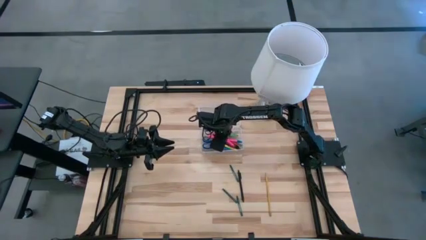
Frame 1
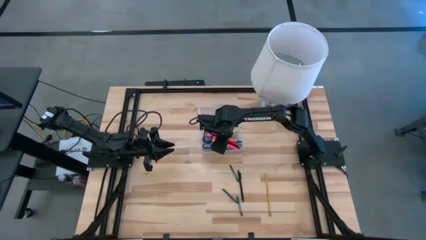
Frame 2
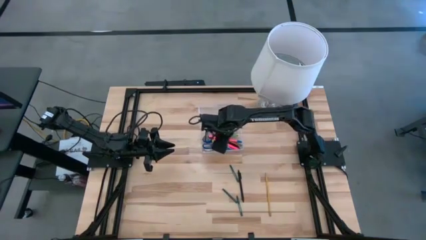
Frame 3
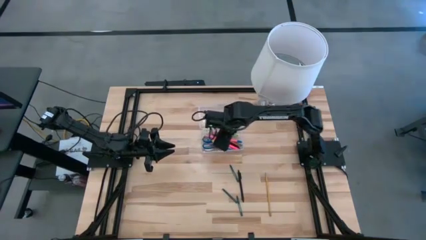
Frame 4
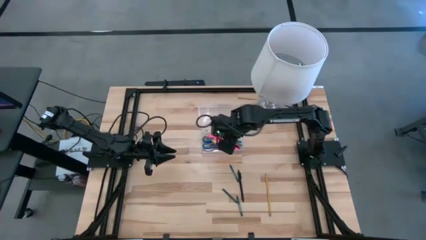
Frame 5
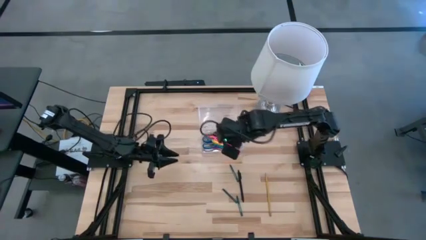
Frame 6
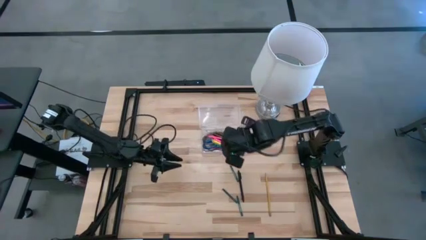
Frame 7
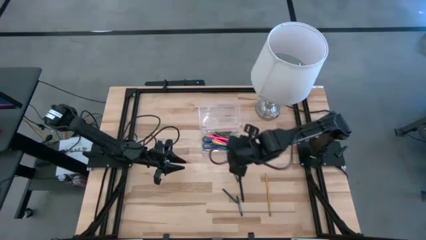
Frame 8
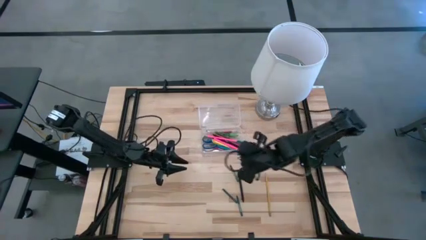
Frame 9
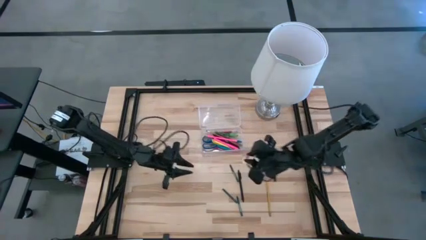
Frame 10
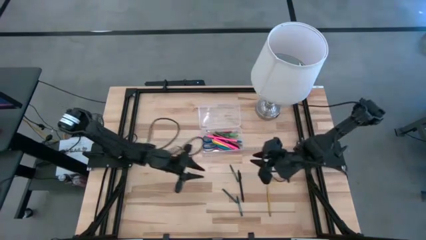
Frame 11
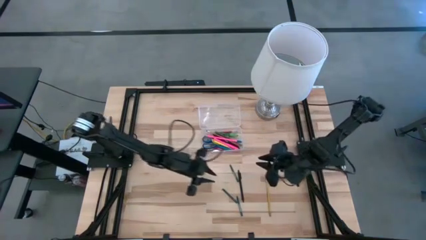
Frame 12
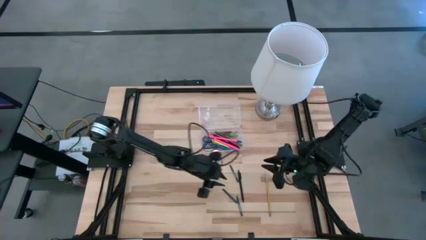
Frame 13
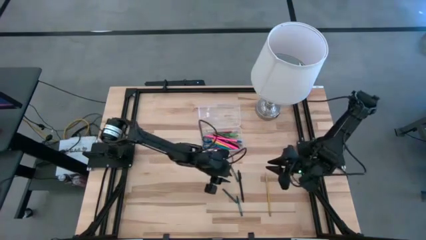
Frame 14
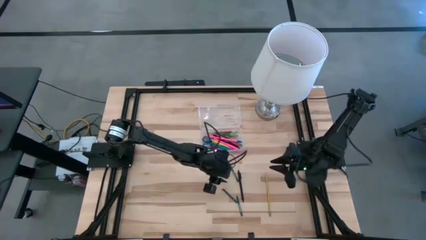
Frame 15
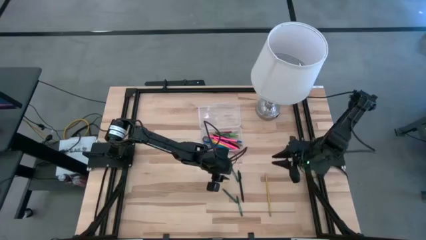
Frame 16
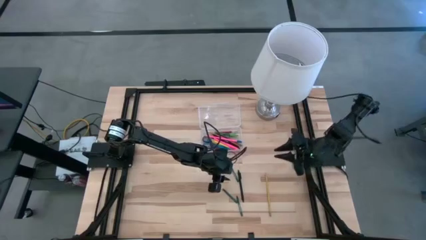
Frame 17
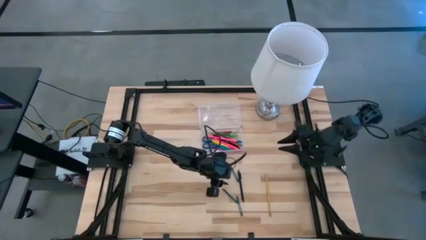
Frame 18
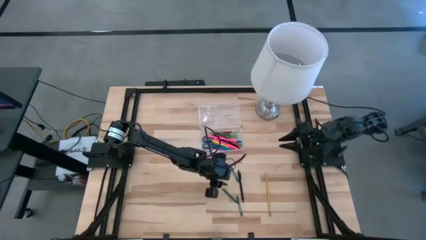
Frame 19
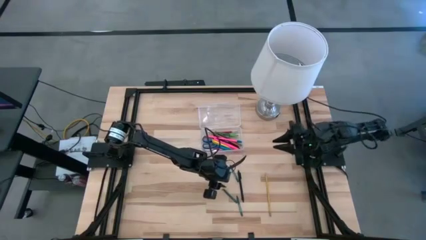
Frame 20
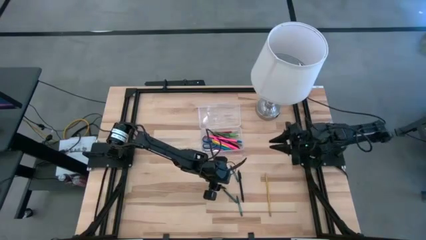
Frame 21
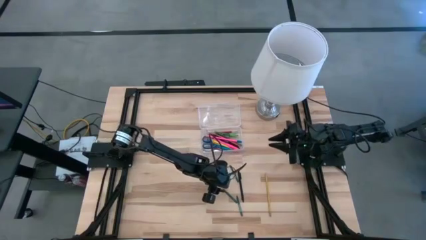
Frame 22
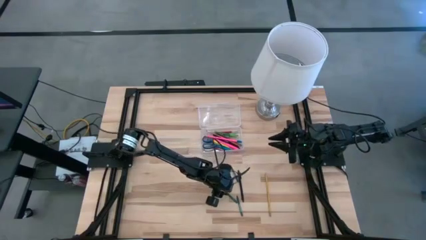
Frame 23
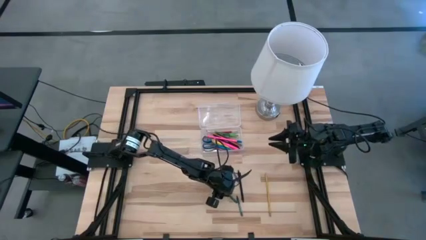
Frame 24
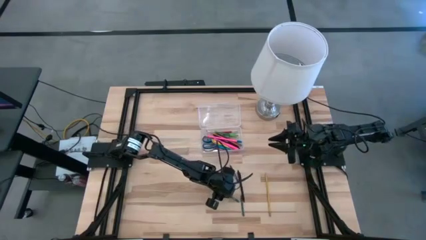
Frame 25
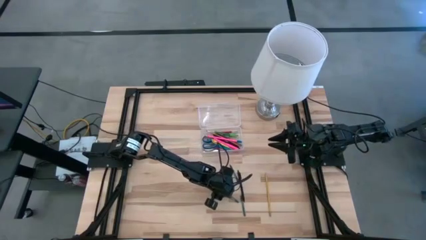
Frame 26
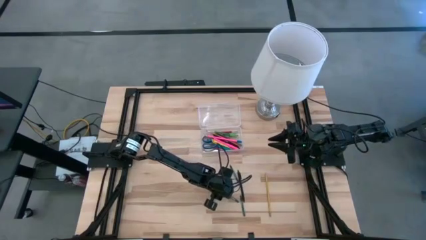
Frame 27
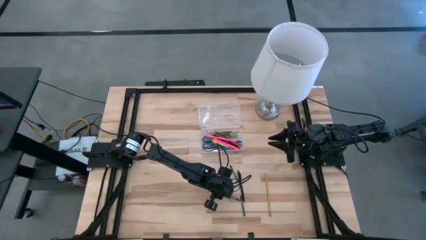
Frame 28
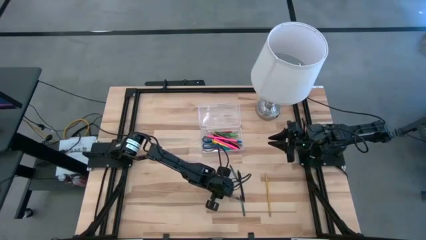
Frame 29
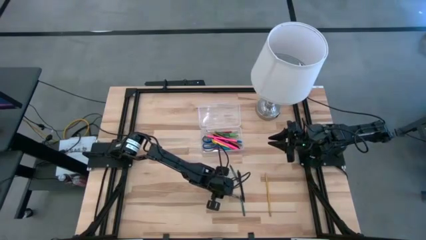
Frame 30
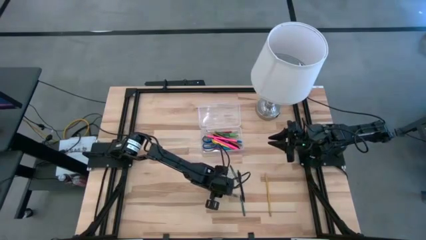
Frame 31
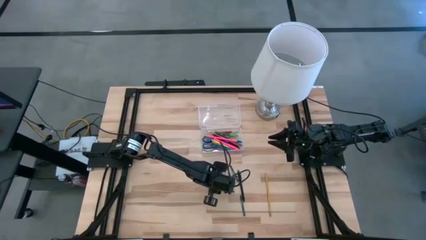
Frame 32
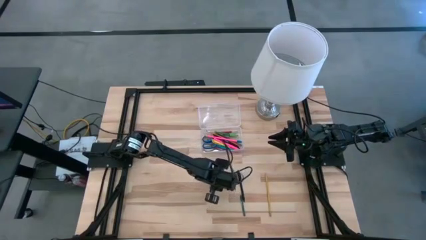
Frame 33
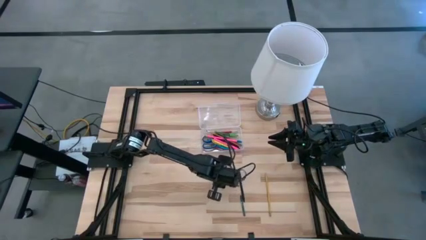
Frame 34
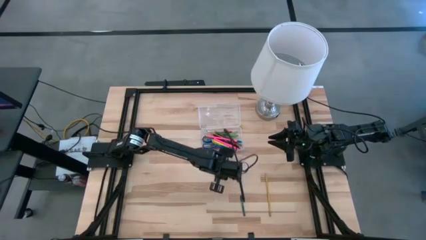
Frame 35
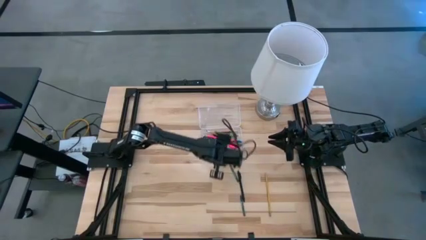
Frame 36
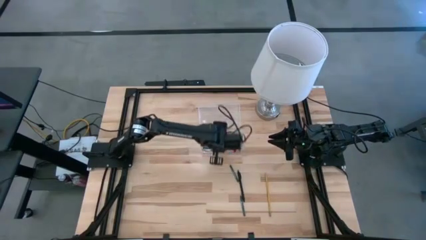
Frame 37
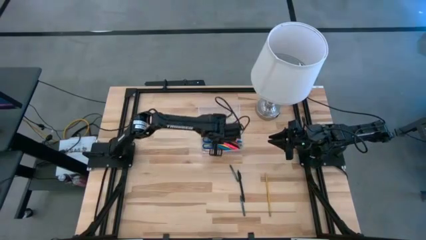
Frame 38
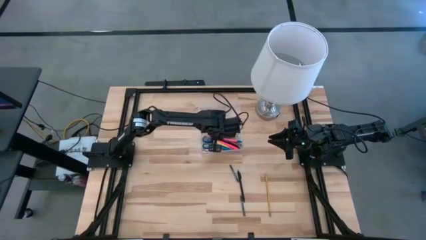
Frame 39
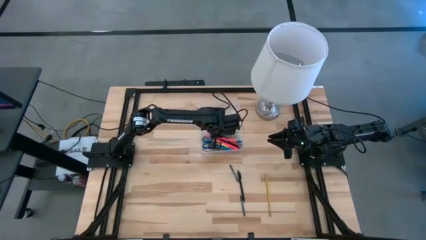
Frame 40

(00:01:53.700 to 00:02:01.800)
Task: Pick & place school supplies into a supply box
Put the green crayon into the transparent supply box

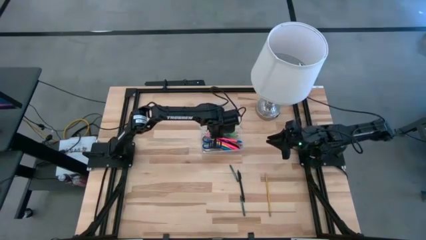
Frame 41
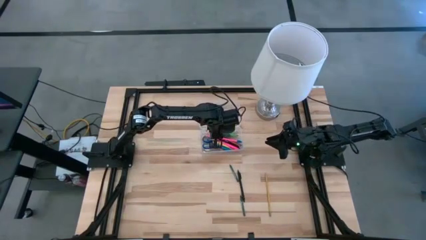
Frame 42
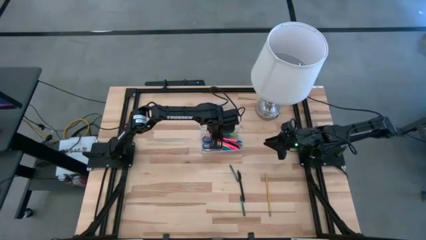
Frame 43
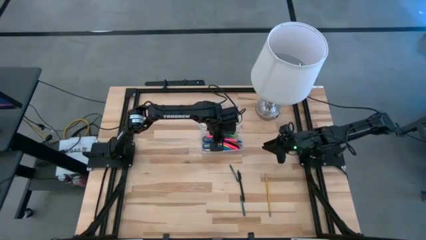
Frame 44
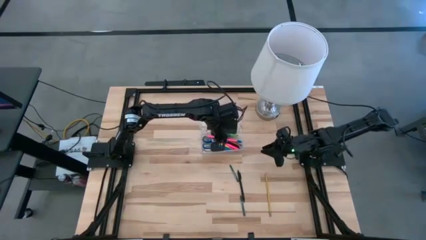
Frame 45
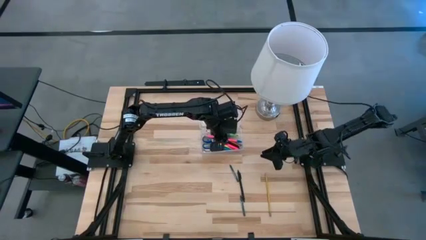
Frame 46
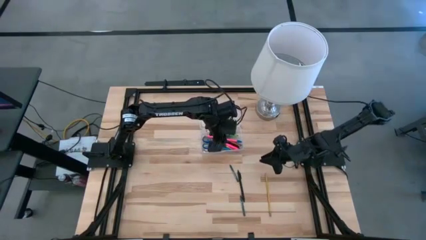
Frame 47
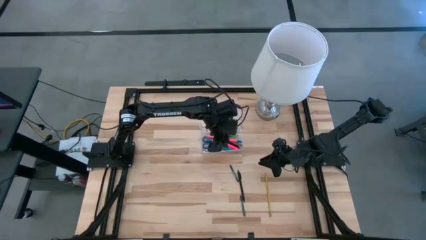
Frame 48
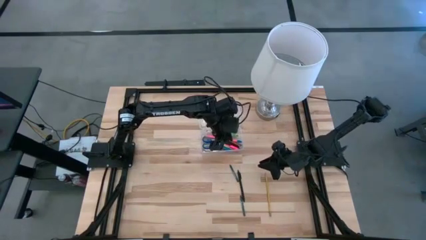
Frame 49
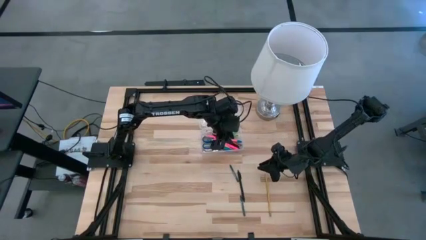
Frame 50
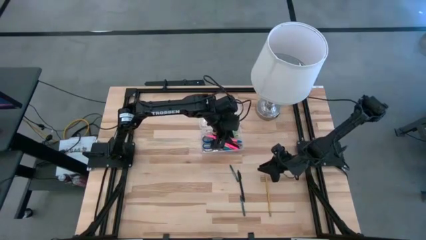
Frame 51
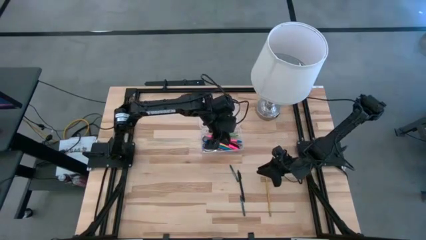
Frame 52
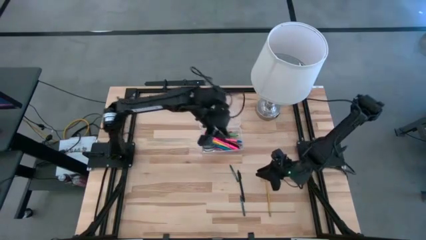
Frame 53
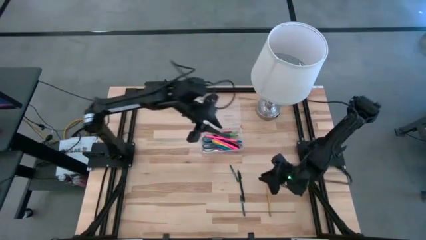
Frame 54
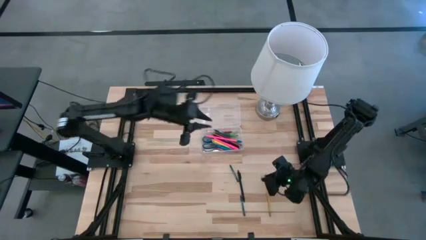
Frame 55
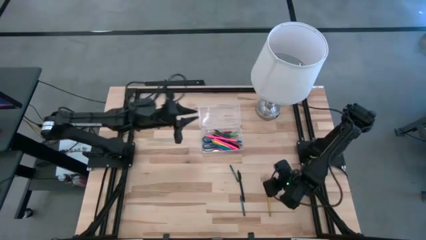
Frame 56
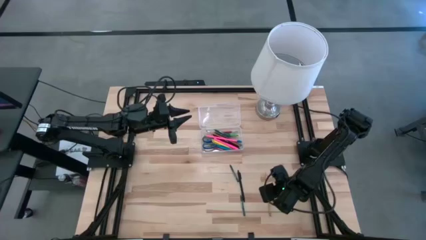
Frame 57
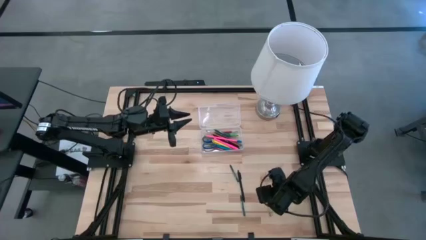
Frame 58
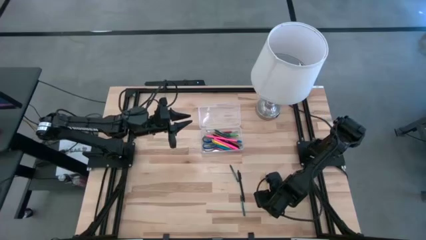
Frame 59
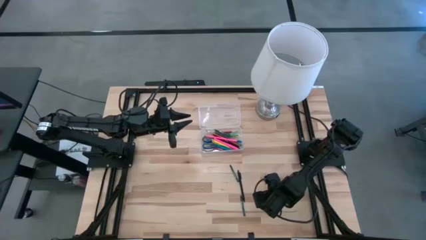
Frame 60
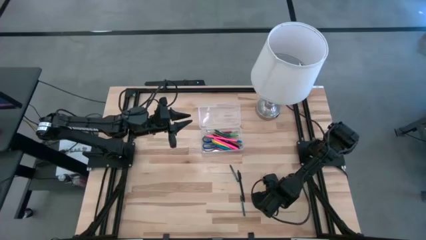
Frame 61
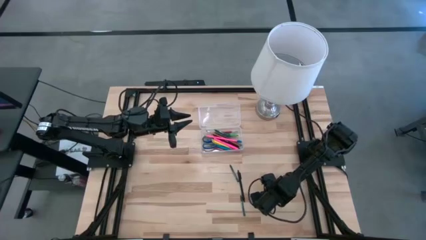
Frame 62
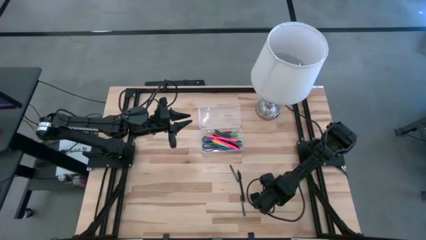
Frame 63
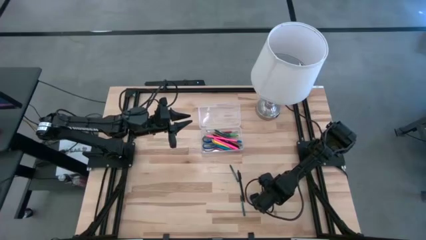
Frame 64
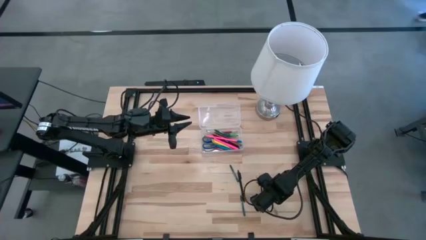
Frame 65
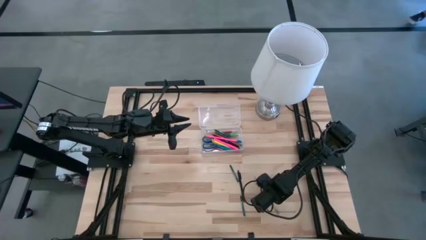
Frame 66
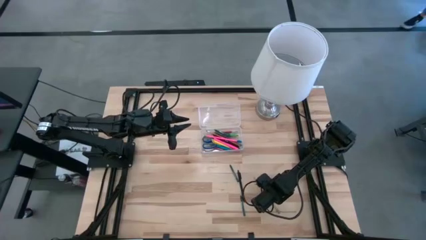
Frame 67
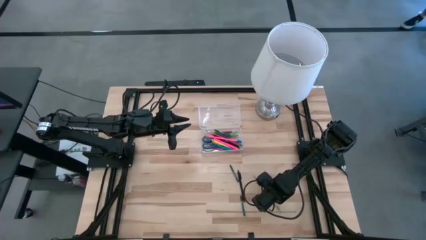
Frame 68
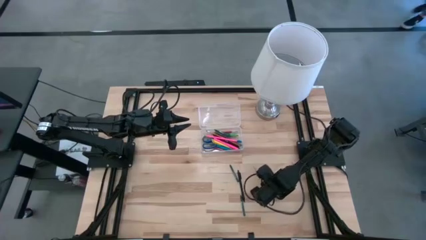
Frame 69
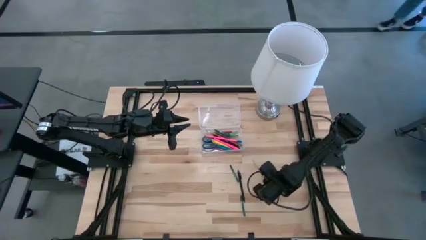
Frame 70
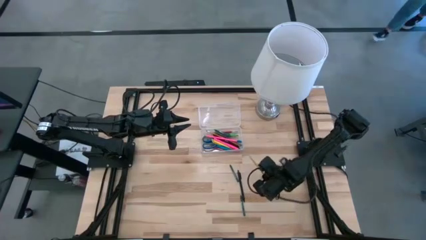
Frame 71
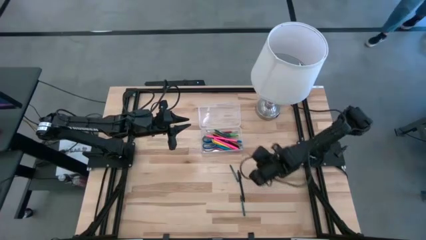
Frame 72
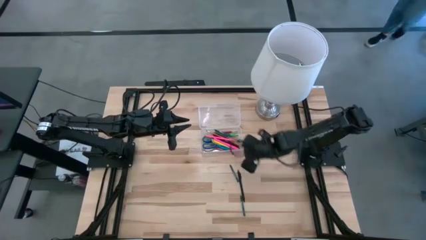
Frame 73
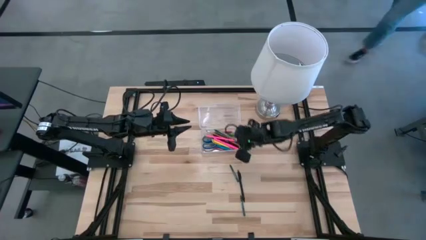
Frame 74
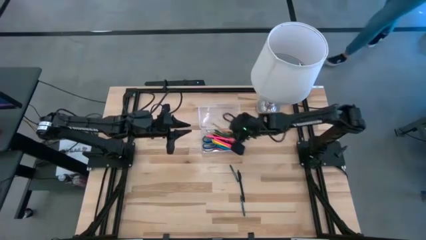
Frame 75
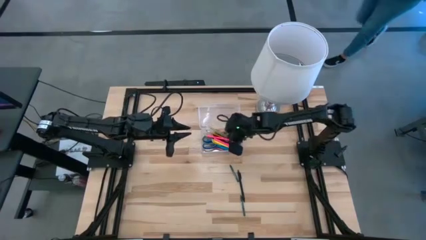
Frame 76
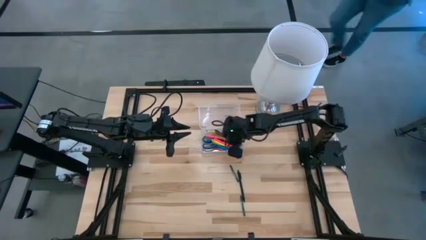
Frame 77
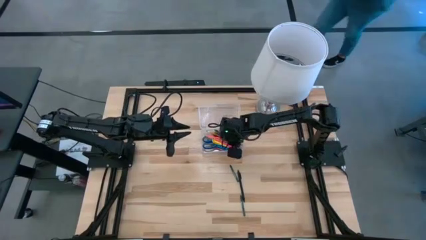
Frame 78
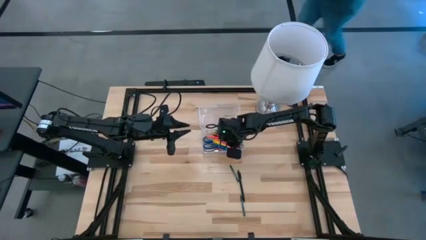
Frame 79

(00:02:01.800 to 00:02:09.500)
Put the yellow pencil into the transparent supply box
